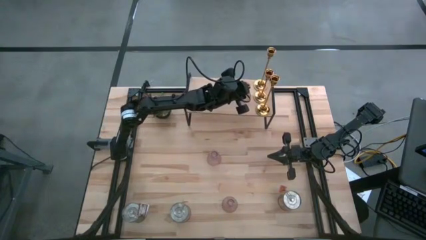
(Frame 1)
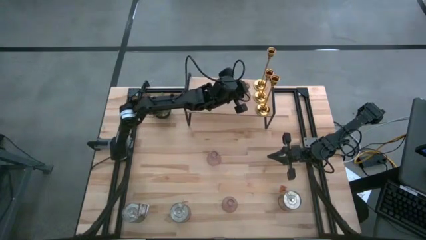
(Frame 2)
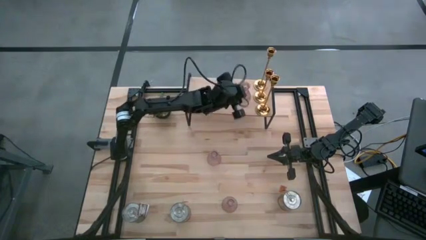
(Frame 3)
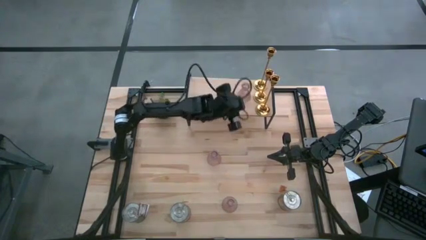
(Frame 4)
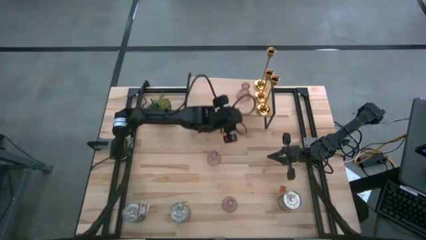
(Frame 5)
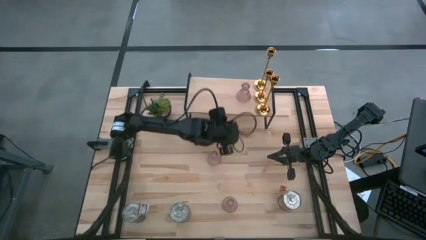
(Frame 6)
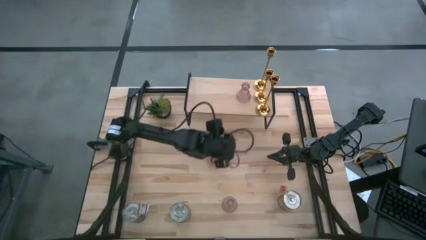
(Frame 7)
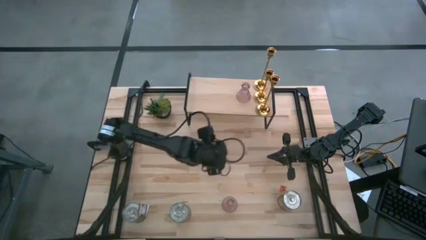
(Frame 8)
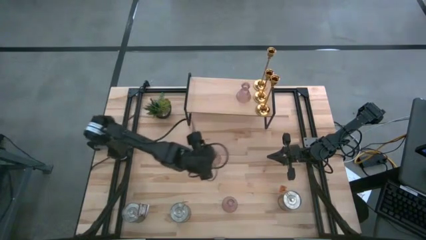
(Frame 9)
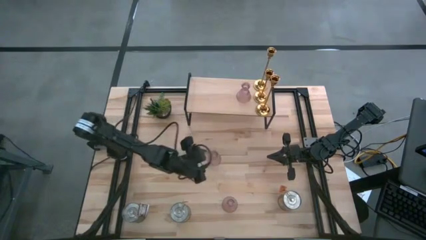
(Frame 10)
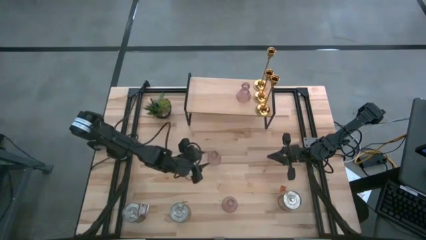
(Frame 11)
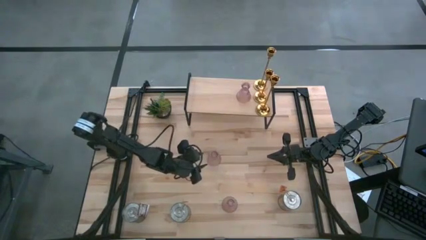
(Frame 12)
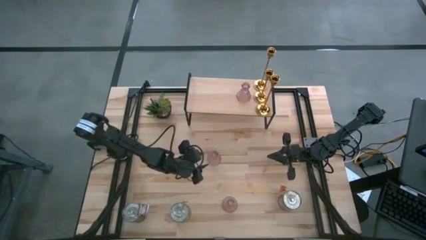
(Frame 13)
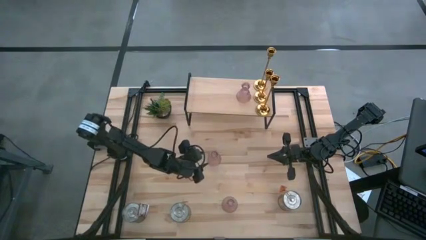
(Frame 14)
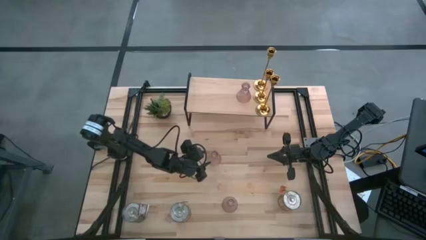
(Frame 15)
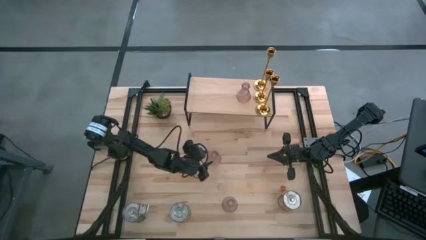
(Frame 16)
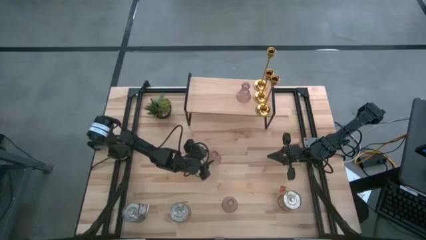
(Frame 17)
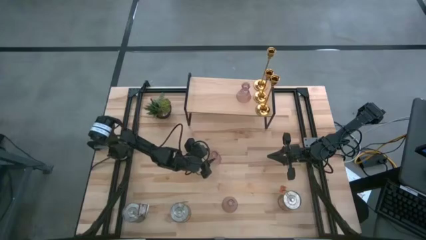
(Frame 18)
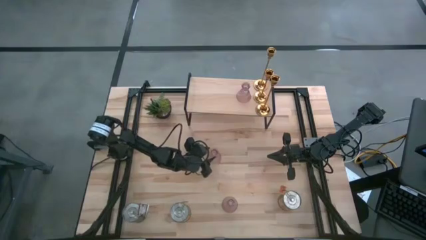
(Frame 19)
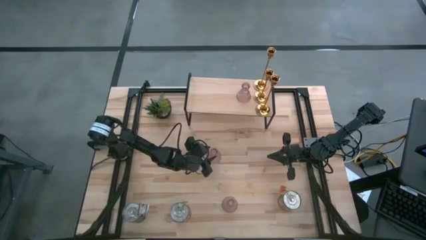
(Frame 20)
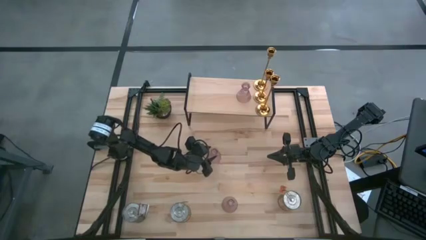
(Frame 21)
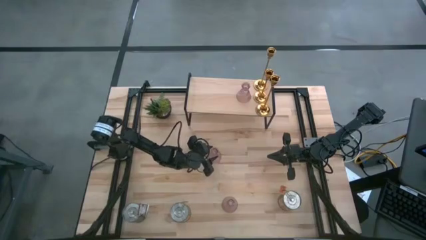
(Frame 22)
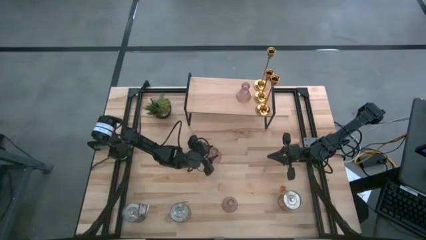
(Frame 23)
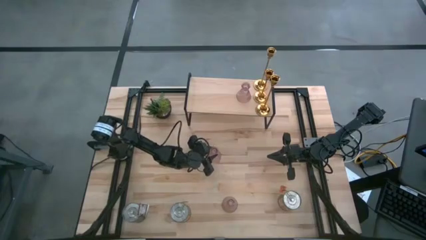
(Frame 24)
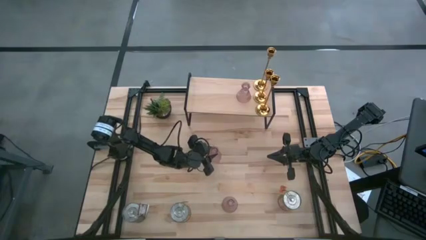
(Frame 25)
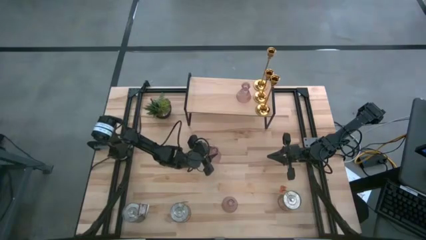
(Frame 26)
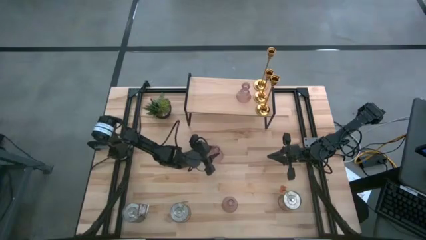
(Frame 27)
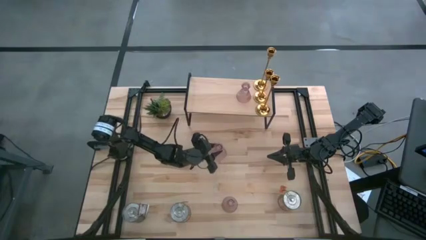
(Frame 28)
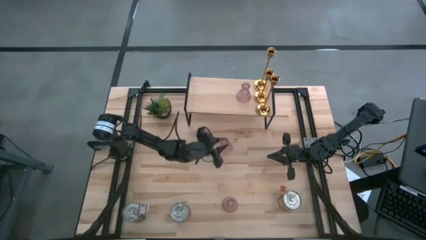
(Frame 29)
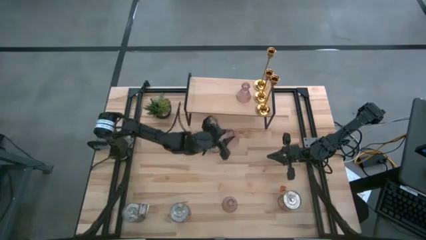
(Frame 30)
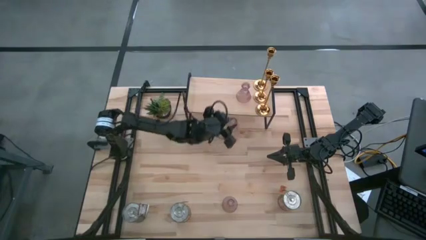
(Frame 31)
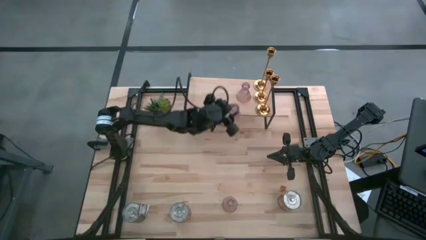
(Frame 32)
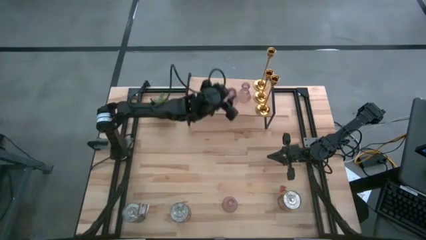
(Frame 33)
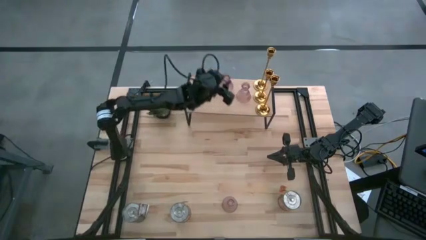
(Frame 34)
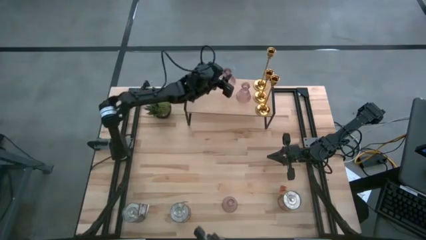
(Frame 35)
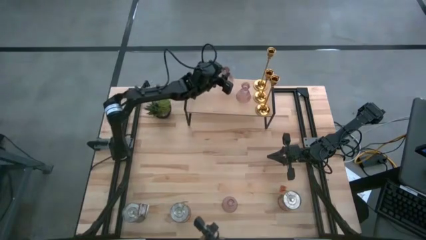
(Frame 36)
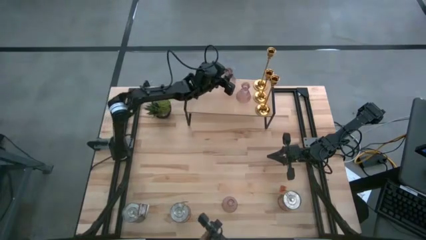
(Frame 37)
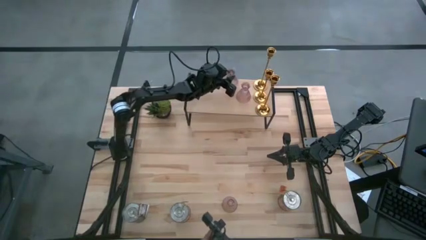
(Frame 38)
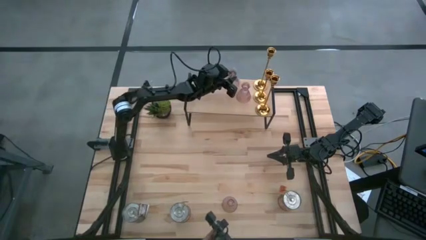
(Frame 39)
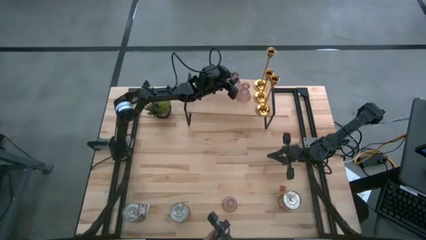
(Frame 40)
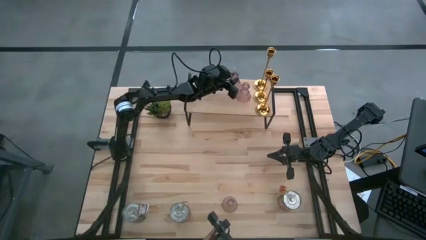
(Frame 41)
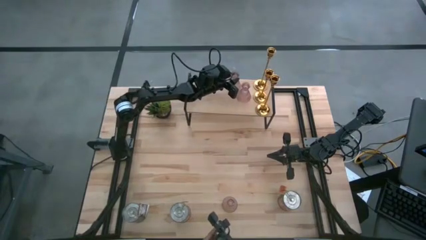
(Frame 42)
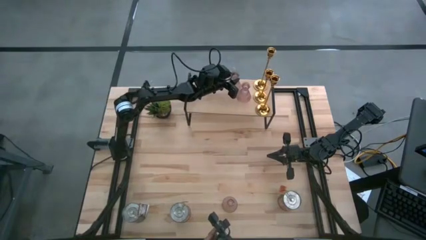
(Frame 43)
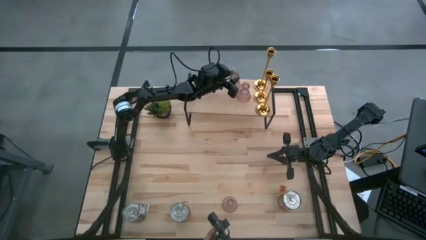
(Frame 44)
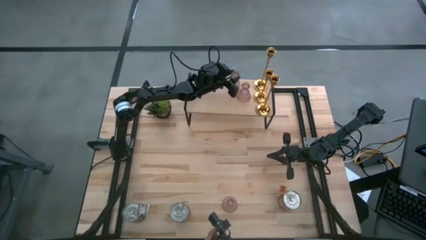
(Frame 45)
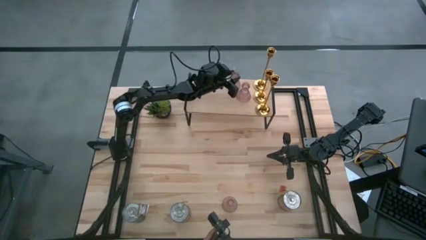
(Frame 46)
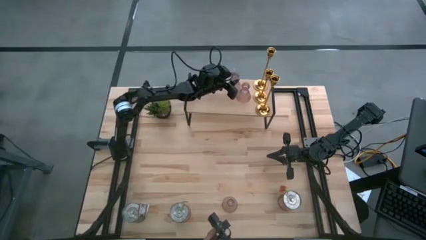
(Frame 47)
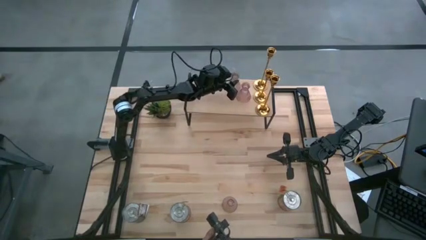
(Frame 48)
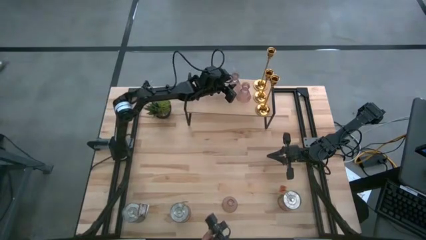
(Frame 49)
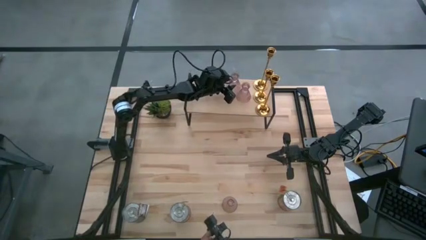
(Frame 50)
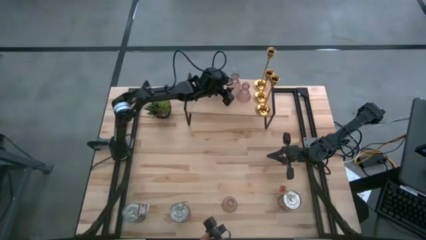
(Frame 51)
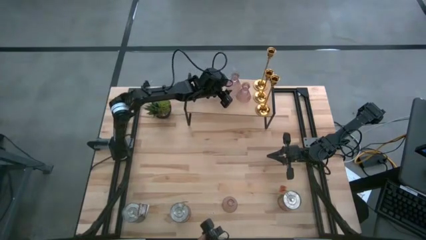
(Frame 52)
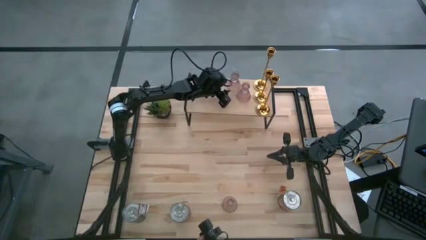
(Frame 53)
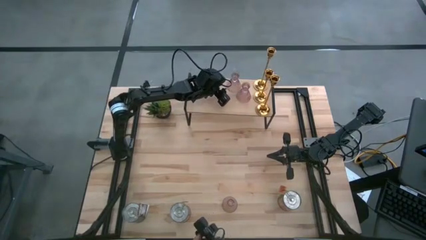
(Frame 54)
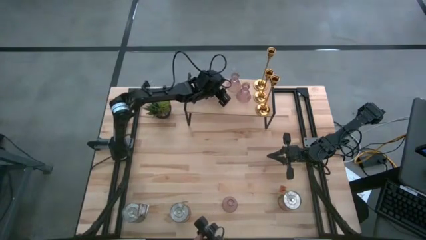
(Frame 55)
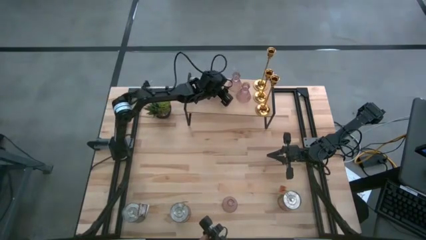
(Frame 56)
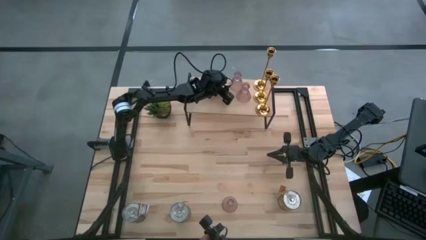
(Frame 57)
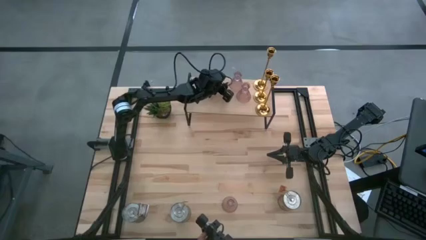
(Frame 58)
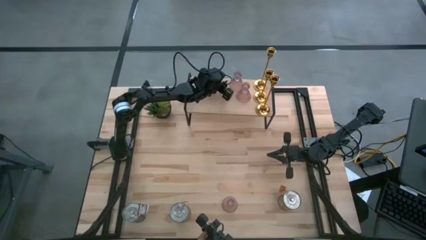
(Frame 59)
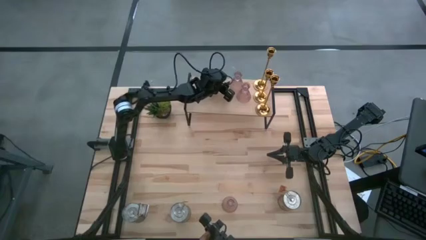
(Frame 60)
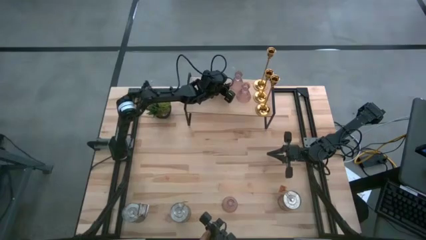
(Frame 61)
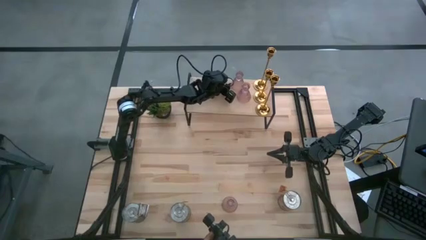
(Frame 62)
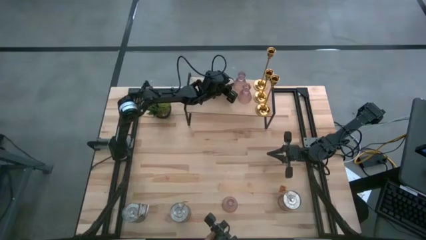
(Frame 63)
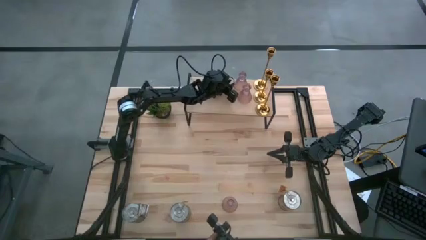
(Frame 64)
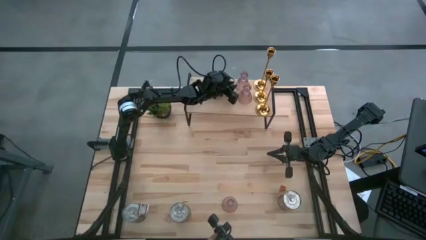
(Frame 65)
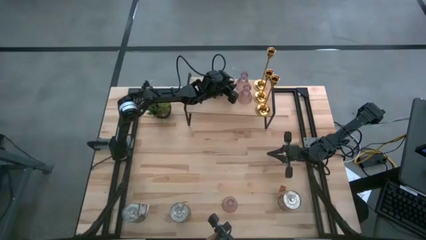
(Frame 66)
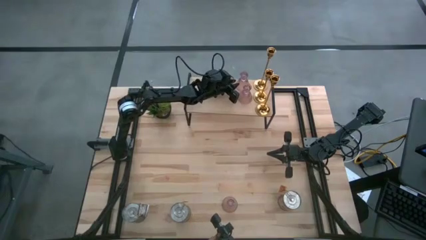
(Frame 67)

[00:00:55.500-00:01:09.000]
Task: Pick & Place candle stick holders
Align the top red candle holder on the shelf with the red candle holder

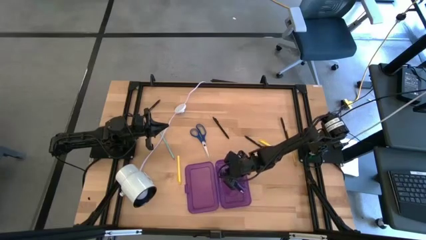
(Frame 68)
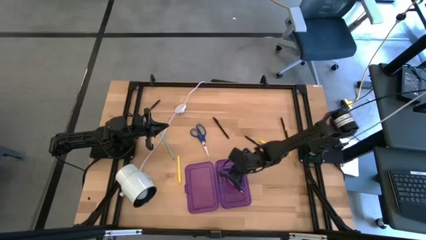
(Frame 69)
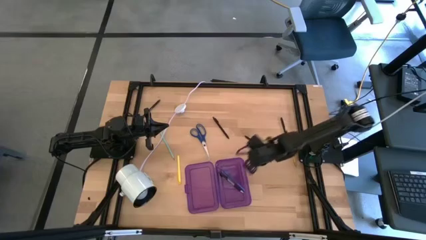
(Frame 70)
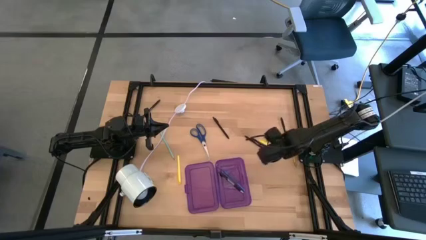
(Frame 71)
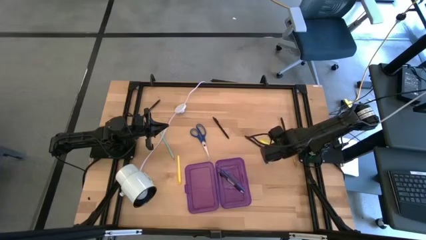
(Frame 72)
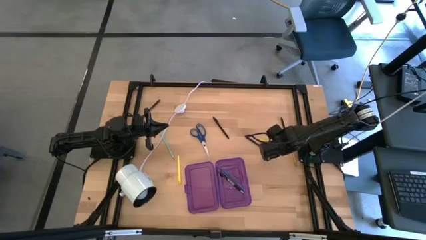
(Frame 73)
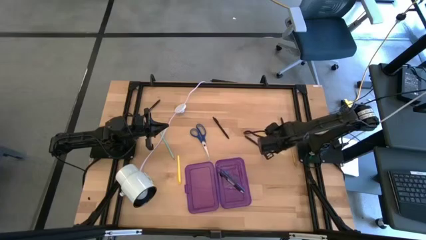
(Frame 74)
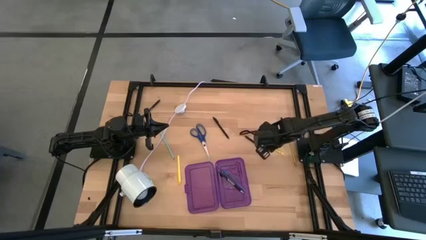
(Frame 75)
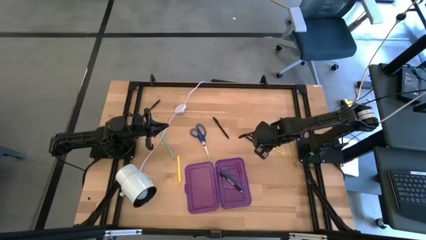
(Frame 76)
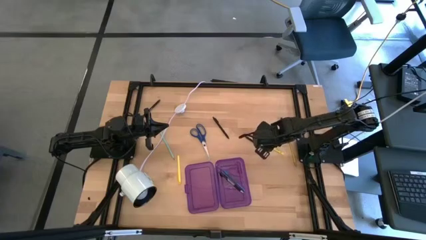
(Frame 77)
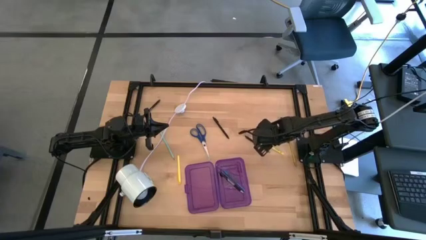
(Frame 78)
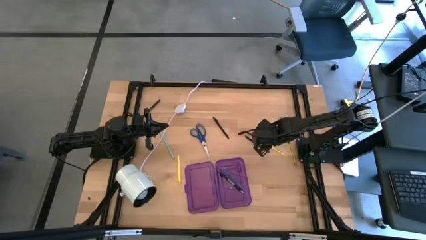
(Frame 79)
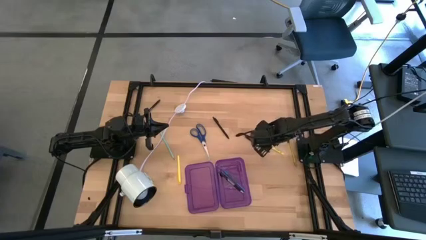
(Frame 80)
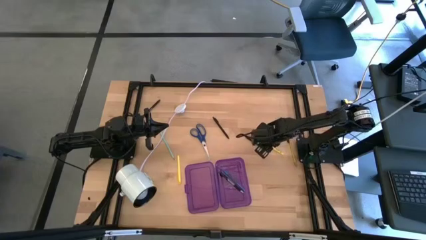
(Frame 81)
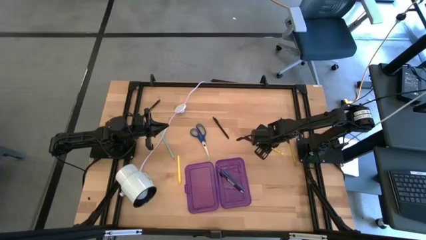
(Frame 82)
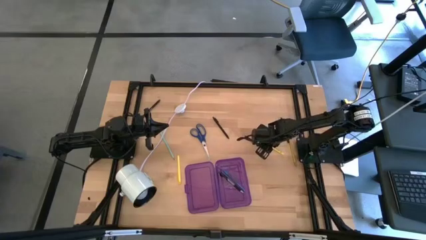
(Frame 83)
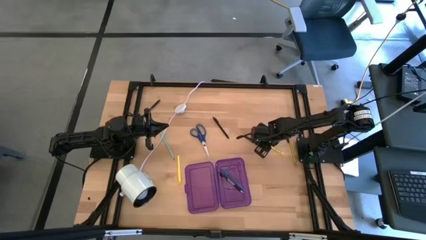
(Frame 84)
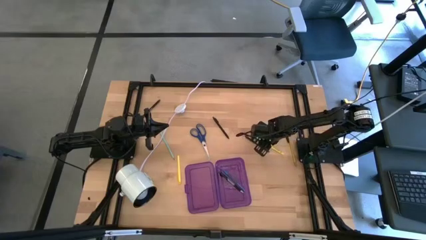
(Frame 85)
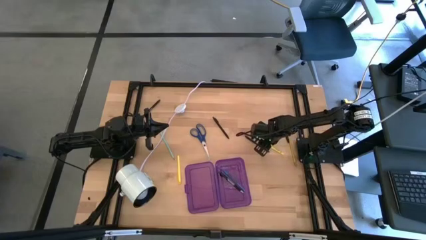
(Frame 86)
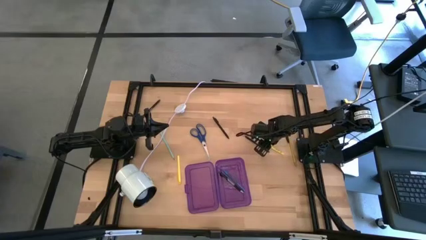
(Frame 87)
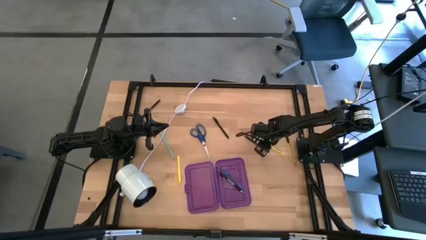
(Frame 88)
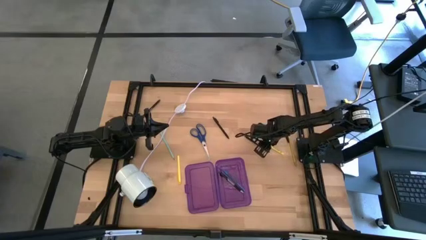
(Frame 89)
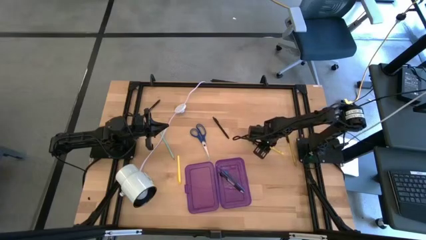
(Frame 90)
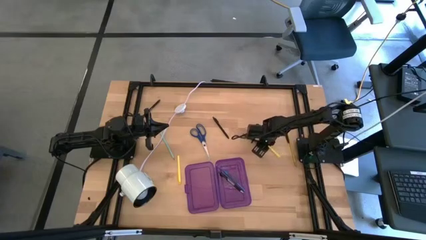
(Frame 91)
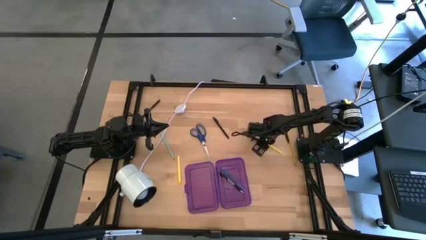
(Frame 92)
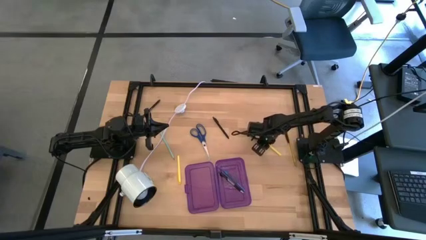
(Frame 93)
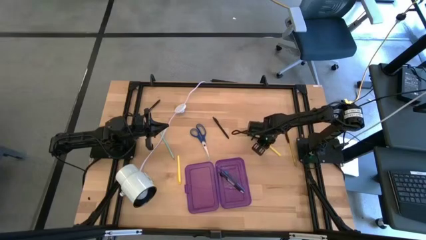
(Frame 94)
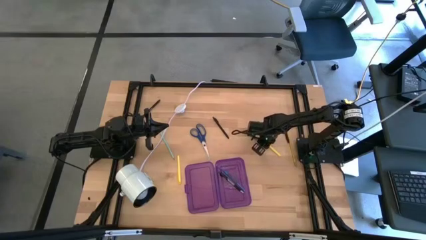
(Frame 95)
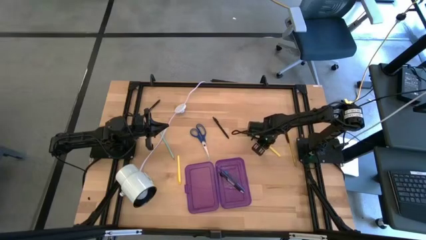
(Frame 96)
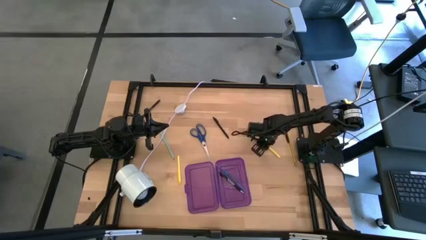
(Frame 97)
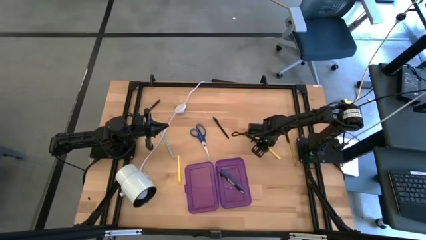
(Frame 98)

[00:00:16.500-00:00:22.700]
Task: Pick & place school supplies into a supply box
Put the yellow pen into the purple supply box
